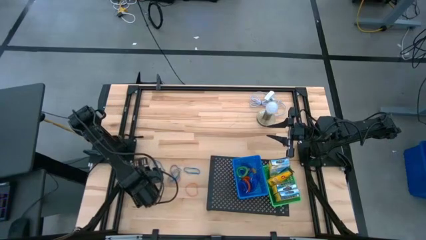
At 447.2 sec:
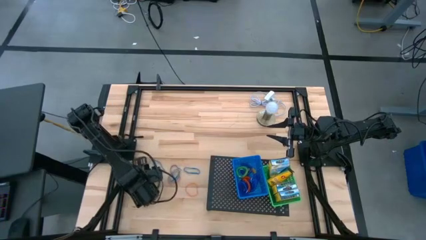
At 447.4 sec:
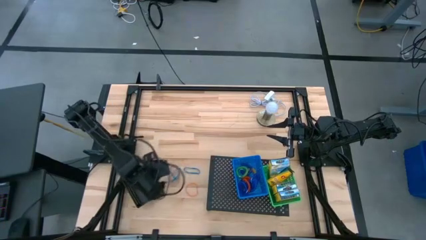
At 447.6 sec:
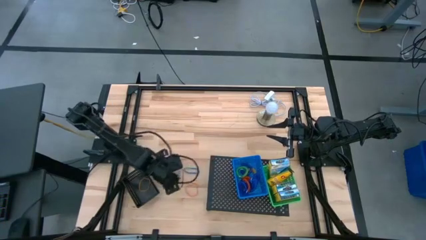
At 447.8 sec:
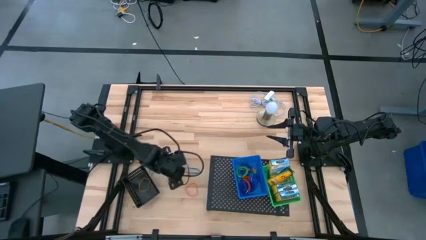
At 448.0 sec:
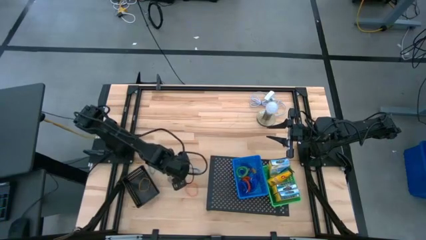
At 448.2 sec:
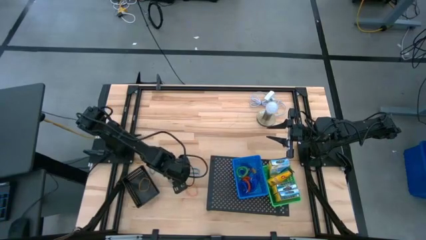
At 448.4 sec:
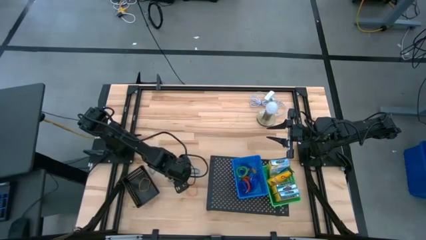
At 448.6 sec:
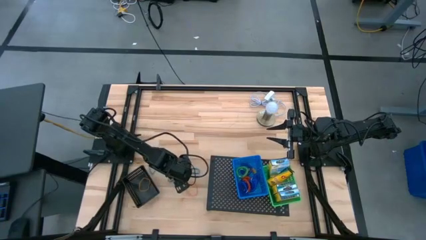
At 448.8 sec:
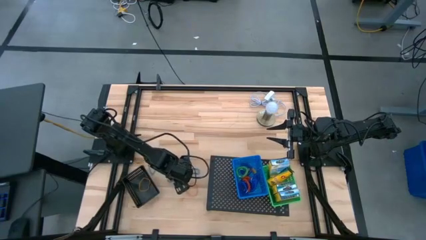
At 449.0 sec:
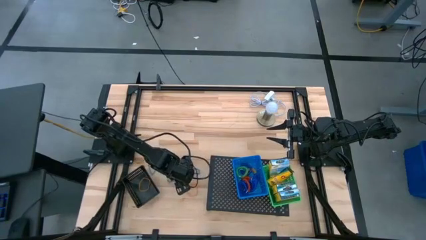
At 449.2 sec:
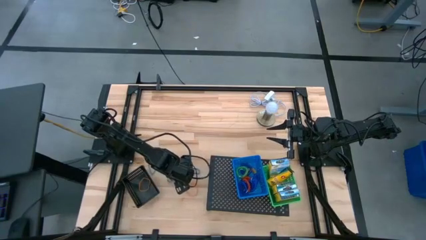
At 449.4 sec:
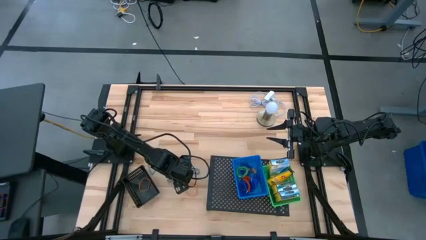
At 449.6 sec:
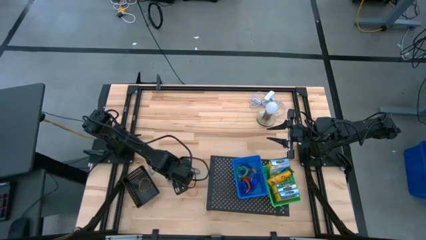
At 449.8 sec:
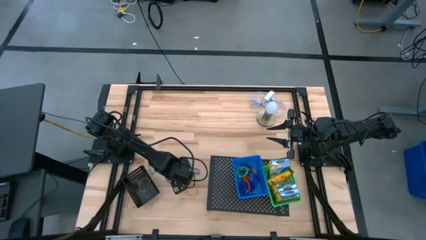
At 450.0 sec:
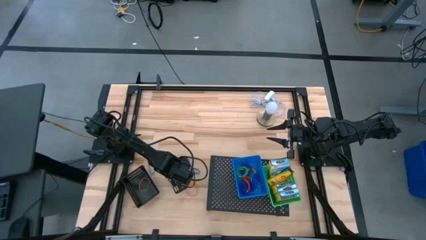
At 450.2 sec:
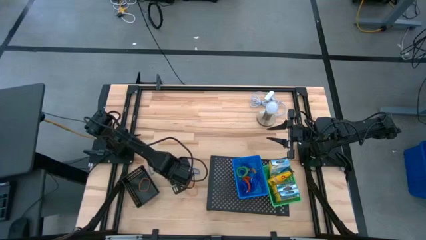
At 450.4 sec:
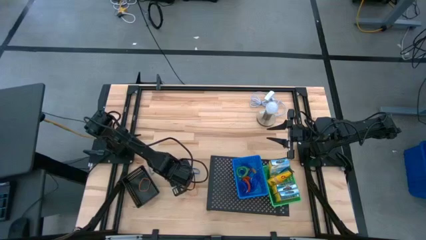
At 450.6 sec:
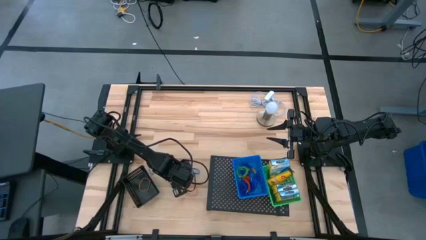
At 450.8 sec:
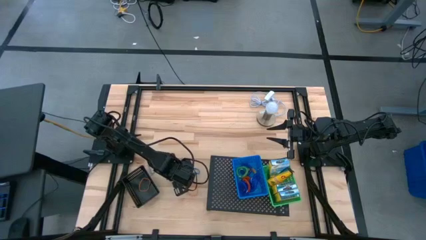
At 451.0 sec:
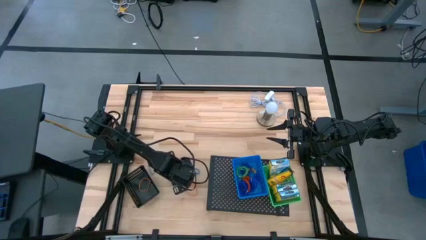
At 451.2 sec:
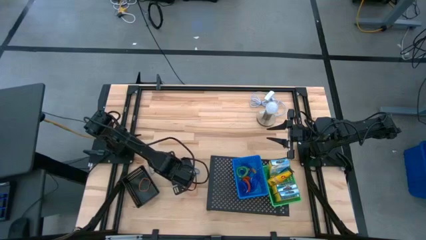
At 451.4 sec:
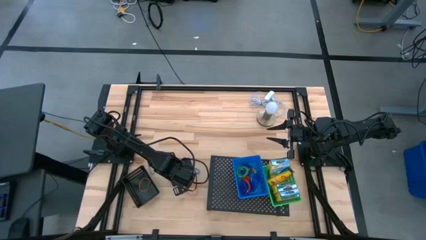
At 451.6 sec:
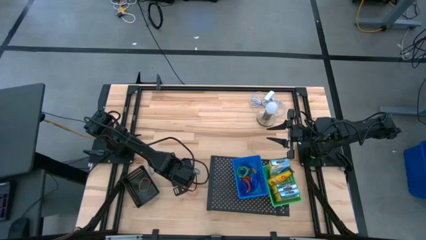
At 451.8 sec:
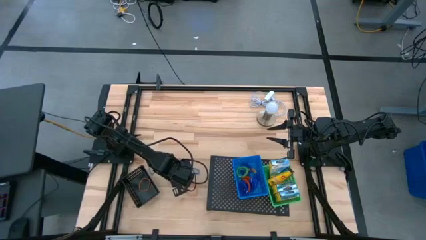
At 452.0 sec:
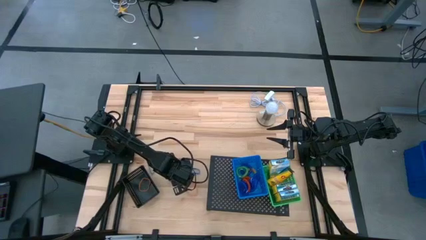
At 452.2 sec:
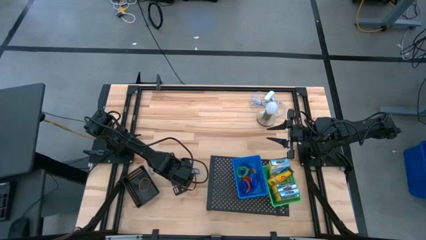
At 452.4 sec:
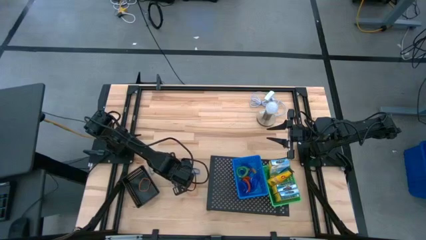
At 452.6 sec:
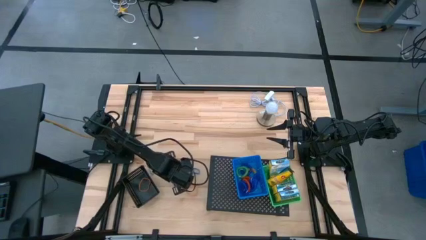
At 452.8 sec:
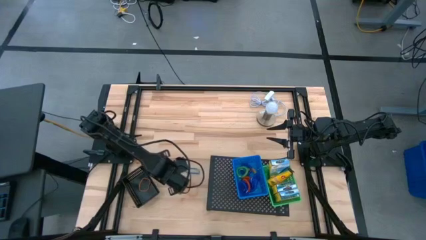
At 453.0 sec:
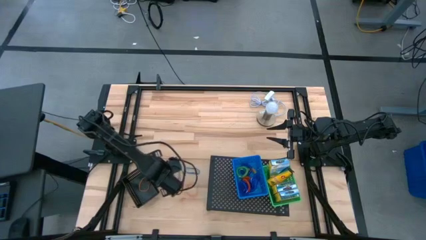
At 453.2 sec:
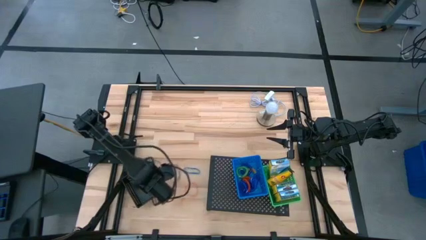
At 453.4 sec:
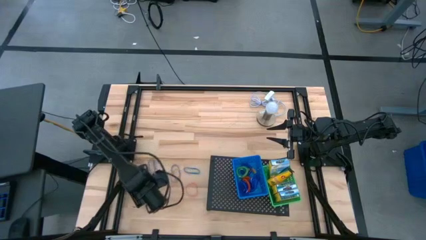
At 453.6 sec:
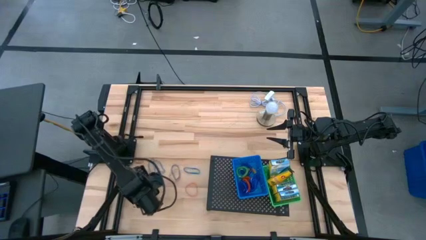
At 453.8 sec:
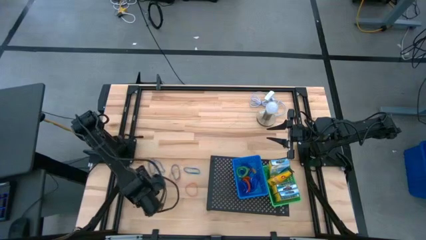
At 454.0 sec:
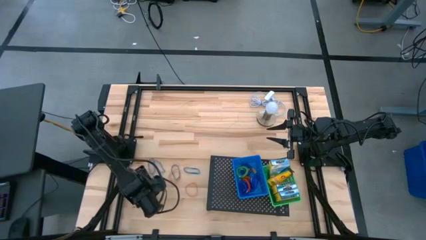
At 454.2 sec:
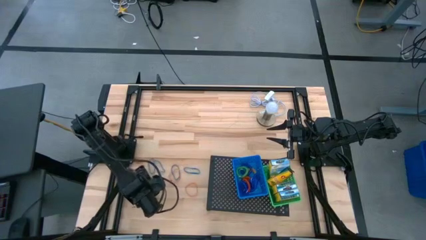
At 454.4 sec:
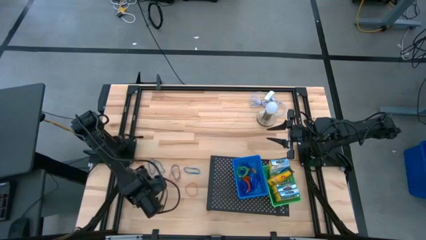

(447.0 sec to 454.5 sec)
Task: Pick & Place Office Desk Supplies
Put the blue rubber band into the black bin

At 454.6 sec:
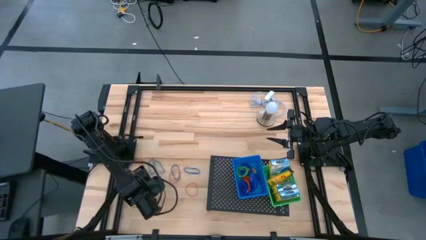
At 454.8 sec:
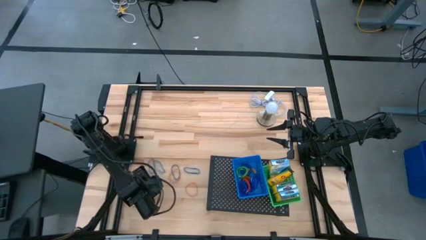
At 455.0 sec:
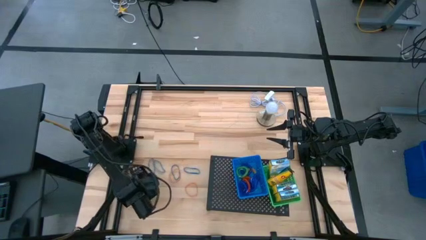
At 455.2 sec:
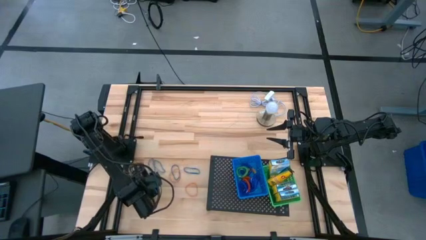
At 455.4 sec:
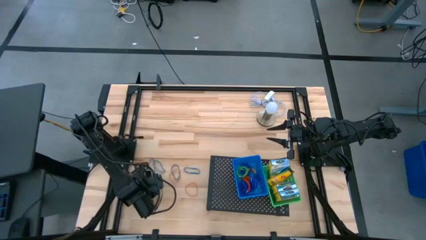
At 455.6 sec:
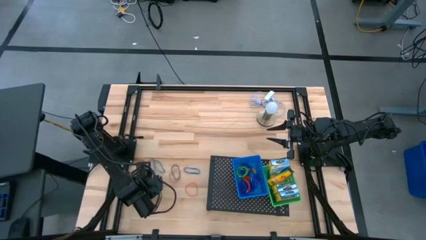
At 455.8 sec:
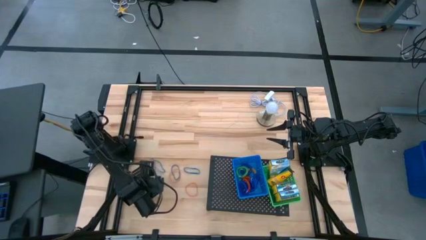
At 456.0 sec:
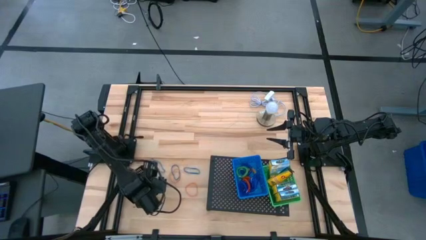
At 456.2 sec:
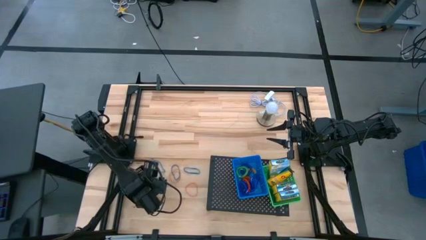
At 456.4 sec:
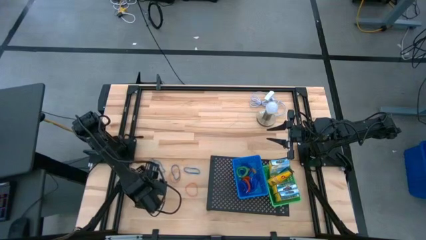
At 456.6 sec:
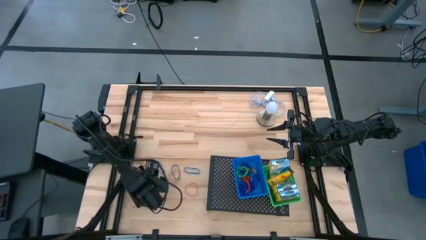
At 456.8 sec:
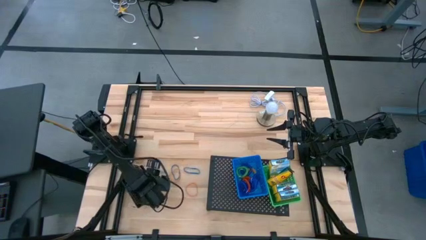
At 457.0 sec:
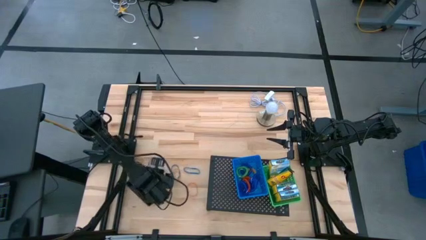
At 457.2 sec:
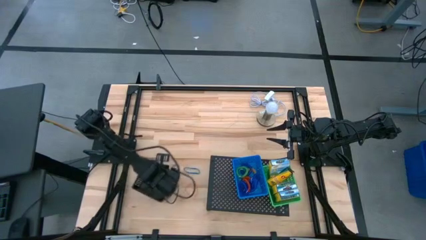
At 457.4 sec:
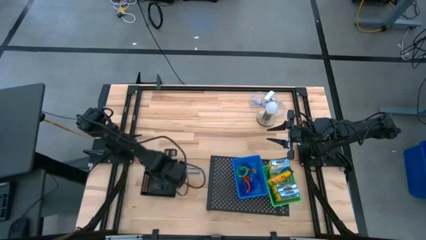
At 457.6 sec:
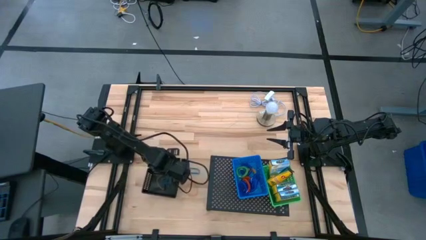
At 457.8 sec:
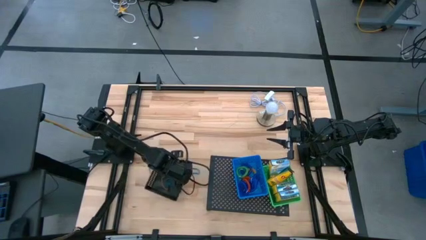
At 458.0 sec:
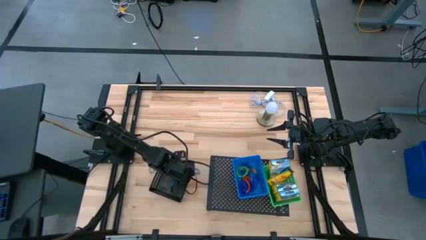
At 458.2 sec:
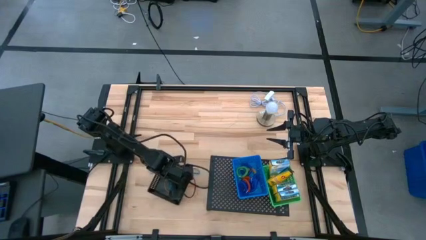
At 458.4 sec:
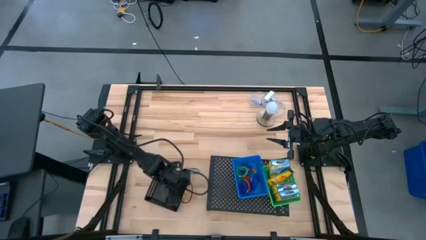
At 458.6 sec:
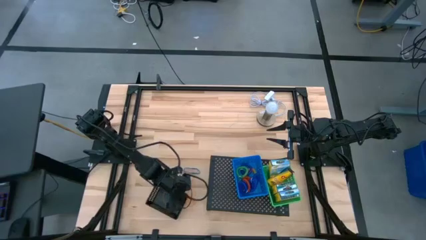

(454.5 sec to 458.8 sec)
Adjust the black bin on the shelf

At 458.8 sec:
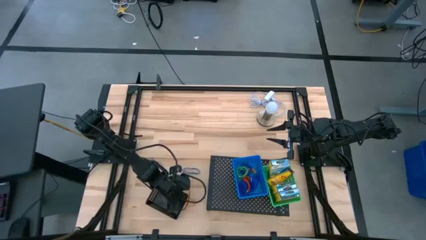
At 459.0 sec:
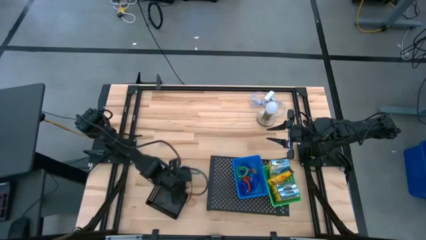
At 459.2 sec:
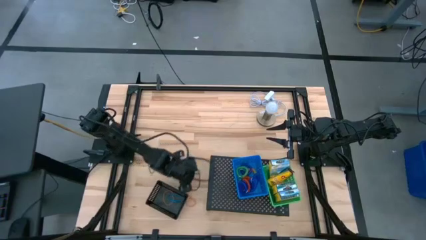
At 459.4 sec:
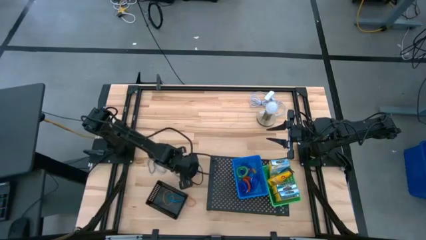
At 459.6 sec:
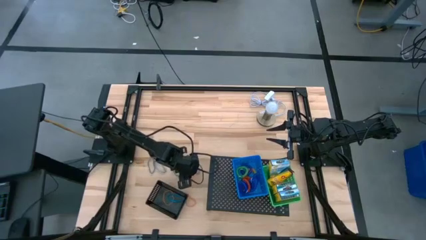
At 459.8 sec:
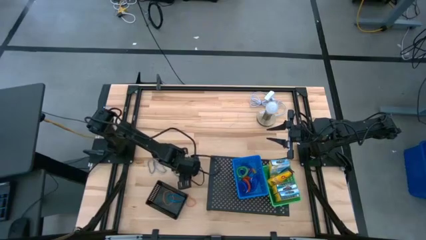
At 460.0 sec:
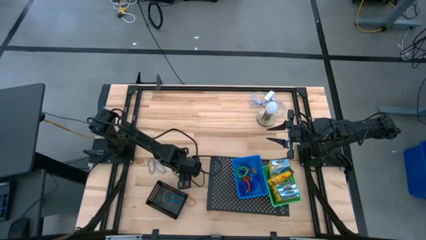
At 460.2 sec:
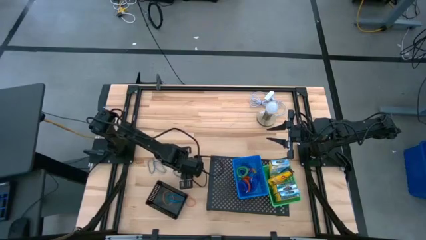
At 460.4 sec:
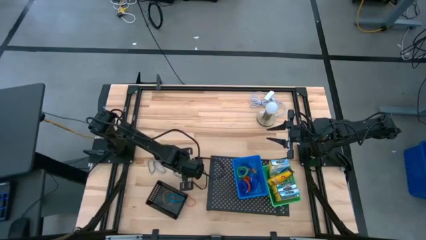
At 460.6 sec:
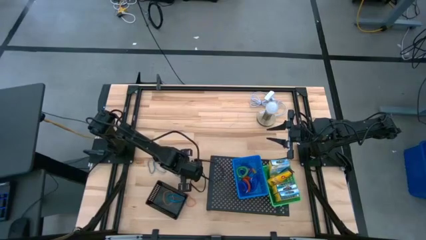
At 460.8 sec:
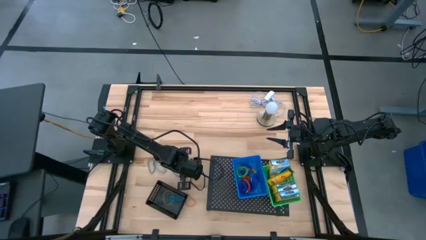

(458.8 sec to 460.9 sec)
Put the top orange rubber band into the black bin

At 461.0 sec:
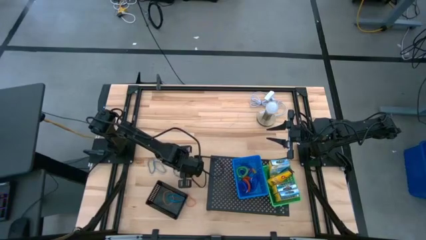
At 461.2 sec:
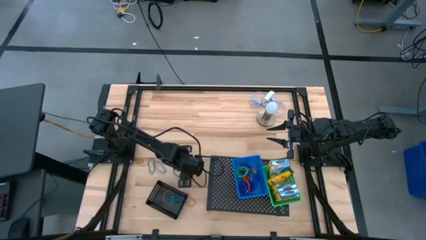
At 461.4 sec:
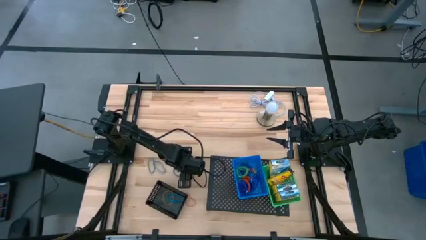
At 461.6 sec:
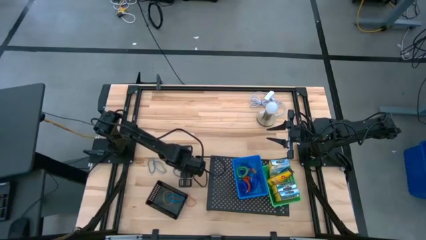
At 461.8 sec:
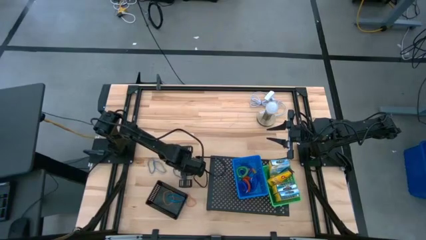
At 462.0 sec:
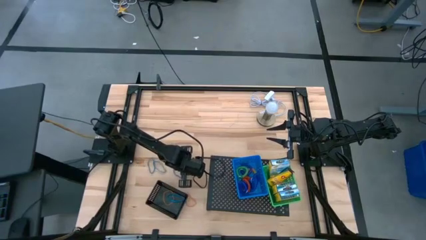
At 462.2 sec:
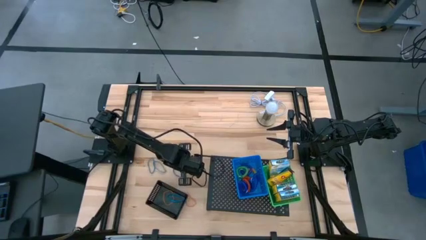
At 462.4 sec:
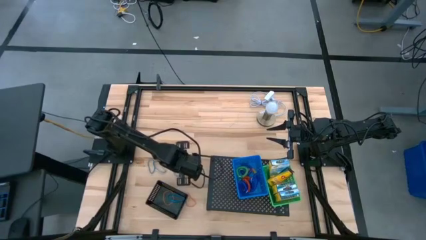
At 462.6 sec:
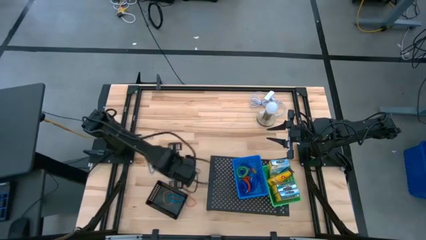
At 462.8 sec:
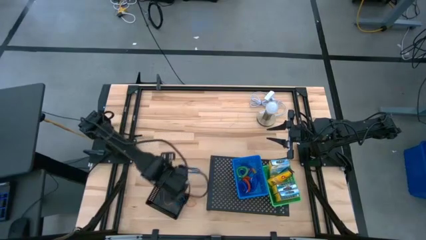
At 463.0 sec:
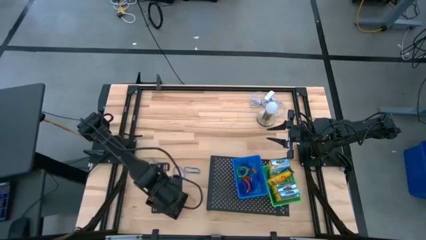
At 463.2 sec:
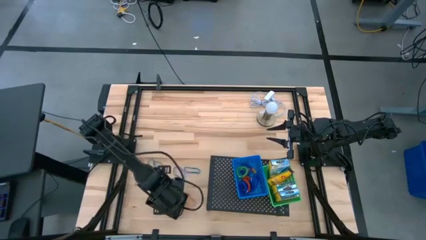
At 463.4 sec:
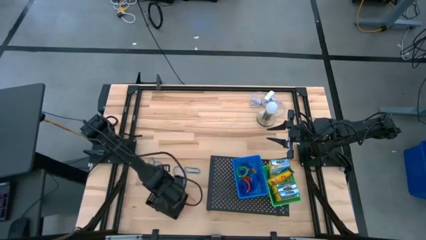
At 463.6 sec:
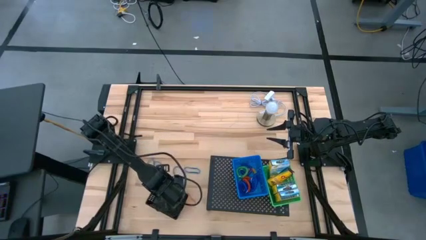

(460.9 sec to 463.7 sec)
Put the top orange rubber band into the black bin
